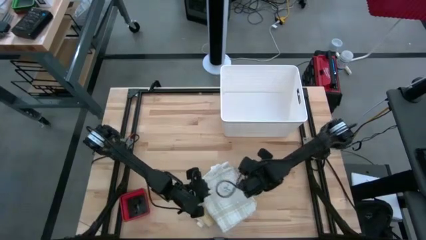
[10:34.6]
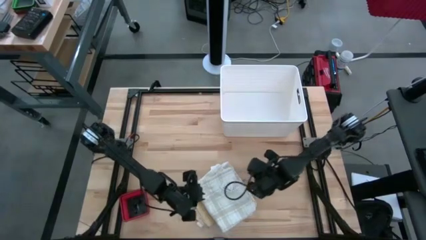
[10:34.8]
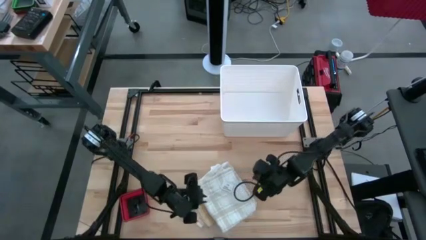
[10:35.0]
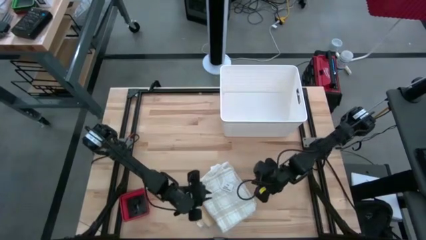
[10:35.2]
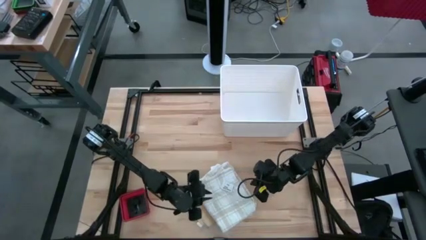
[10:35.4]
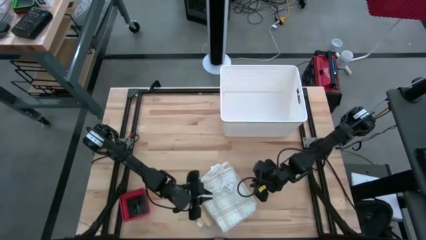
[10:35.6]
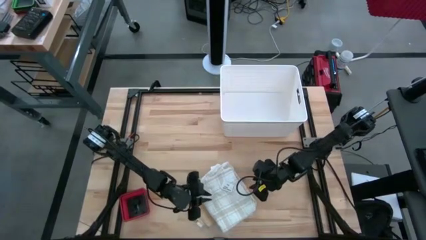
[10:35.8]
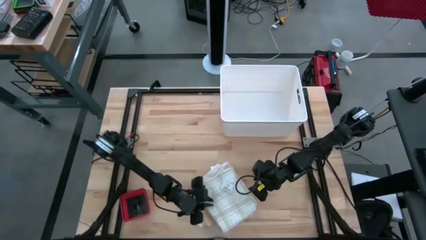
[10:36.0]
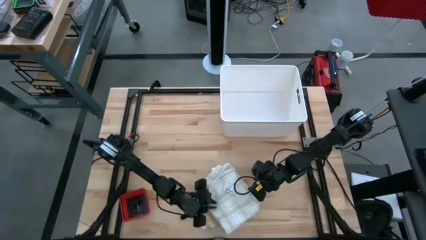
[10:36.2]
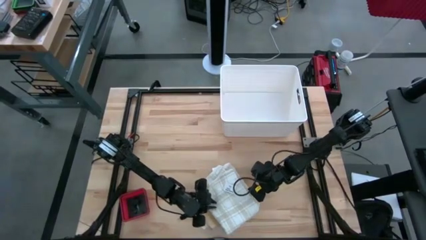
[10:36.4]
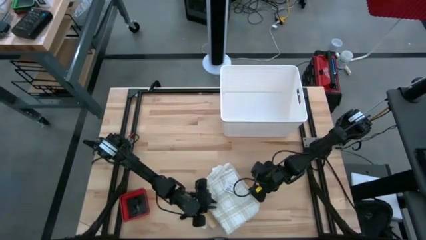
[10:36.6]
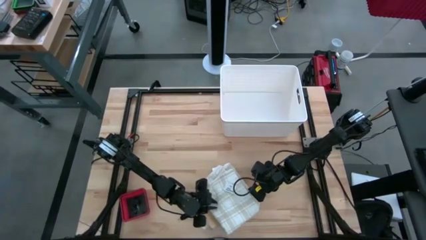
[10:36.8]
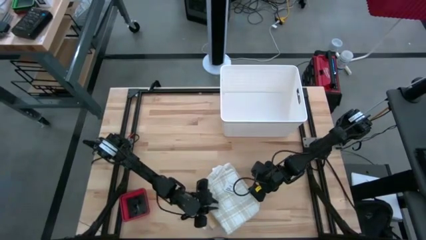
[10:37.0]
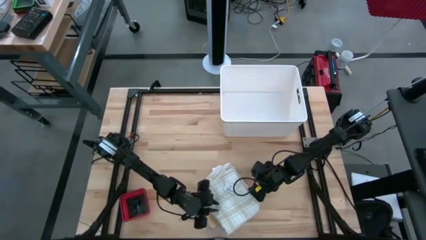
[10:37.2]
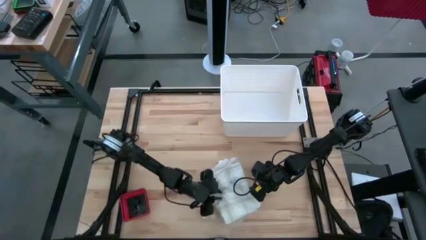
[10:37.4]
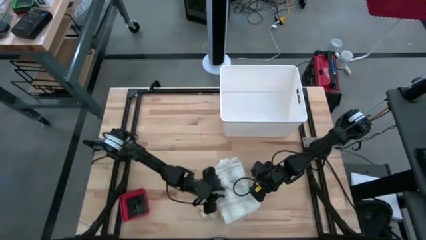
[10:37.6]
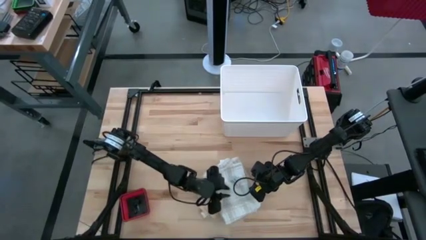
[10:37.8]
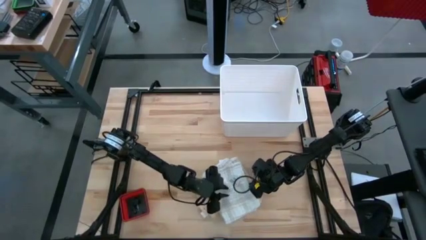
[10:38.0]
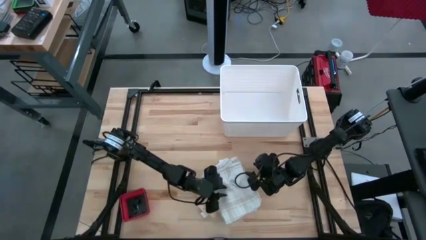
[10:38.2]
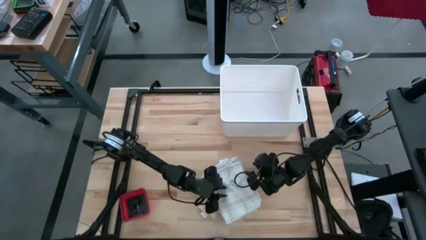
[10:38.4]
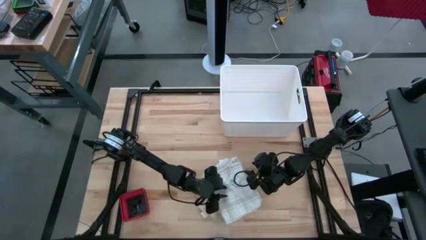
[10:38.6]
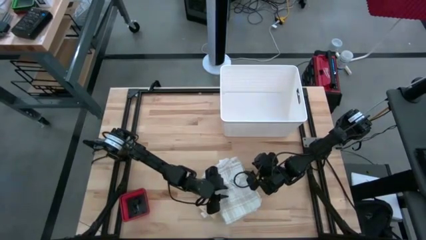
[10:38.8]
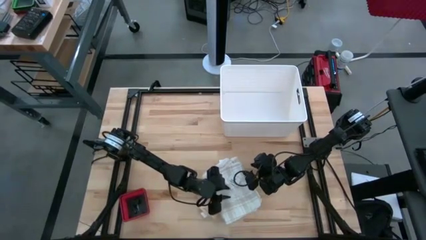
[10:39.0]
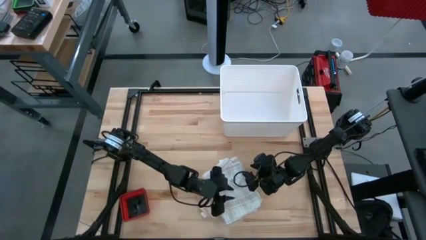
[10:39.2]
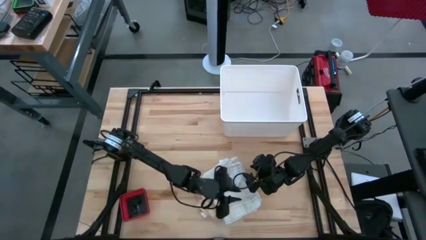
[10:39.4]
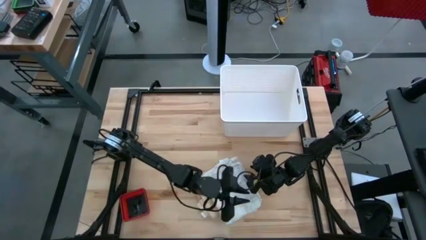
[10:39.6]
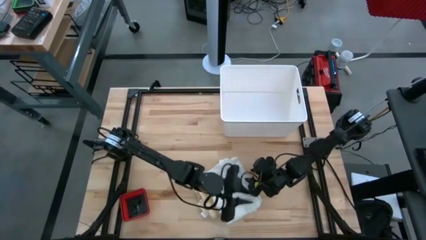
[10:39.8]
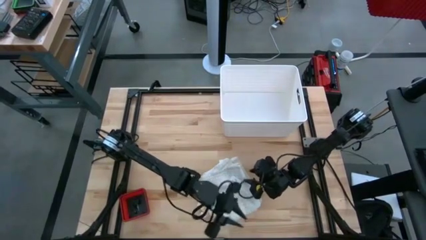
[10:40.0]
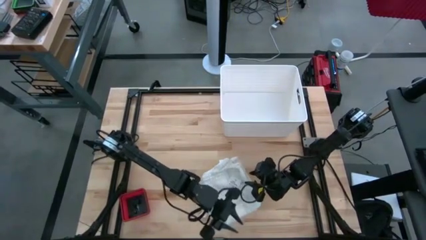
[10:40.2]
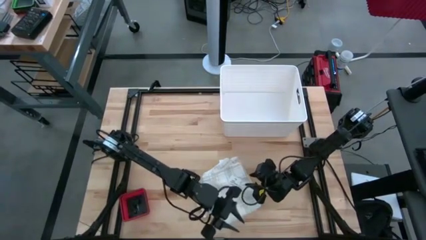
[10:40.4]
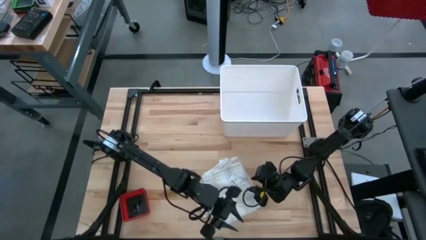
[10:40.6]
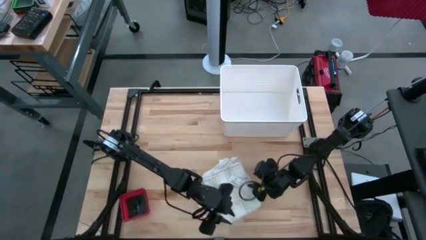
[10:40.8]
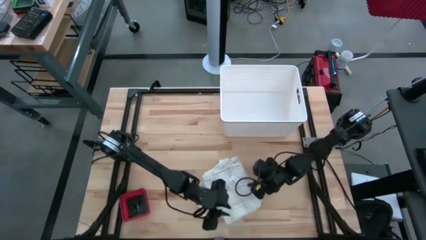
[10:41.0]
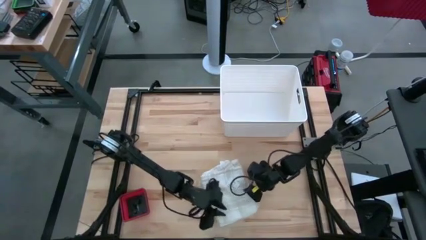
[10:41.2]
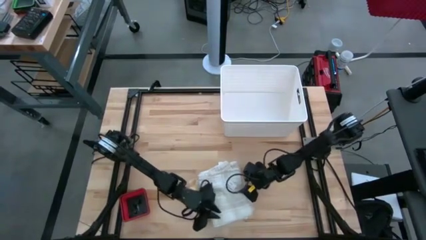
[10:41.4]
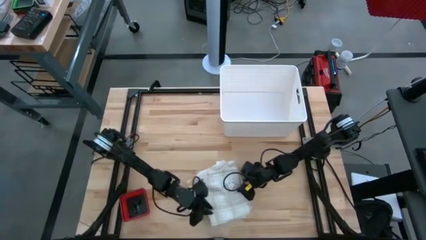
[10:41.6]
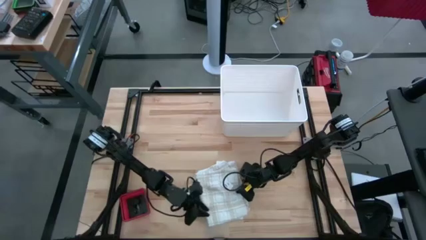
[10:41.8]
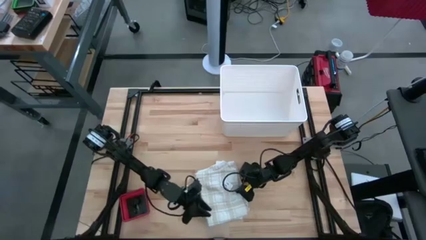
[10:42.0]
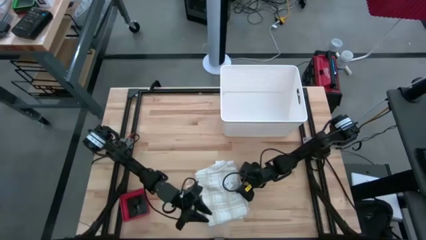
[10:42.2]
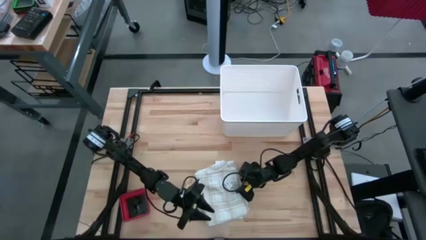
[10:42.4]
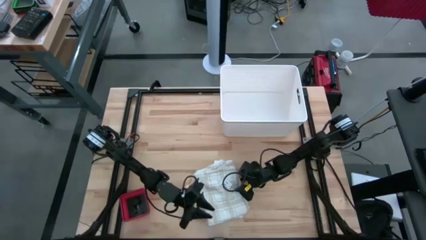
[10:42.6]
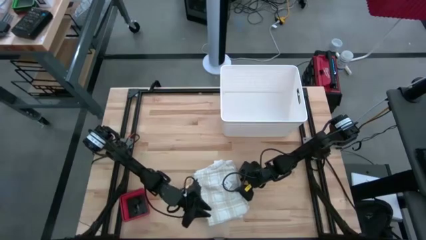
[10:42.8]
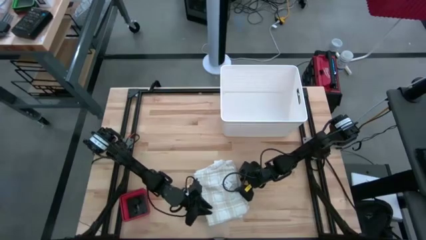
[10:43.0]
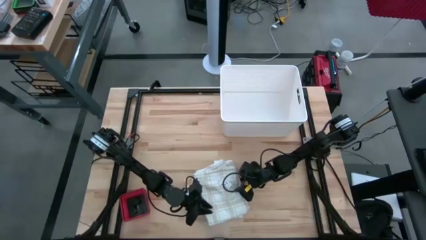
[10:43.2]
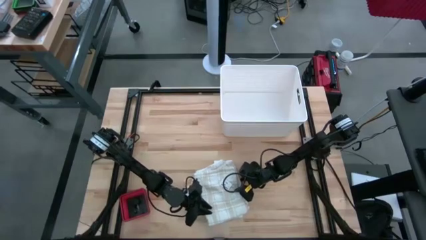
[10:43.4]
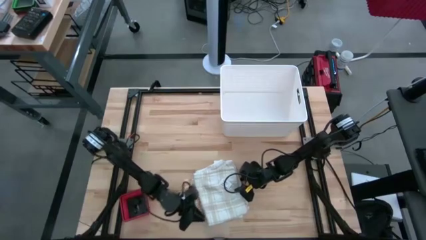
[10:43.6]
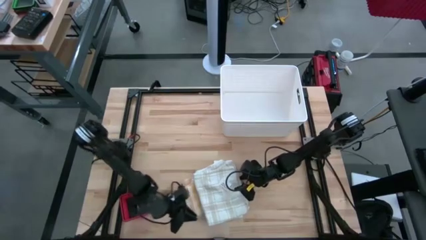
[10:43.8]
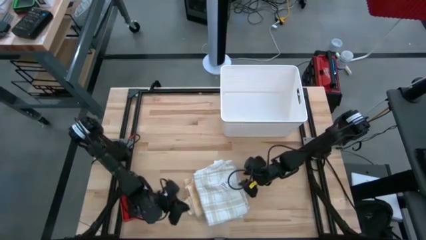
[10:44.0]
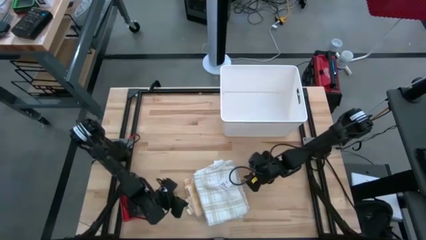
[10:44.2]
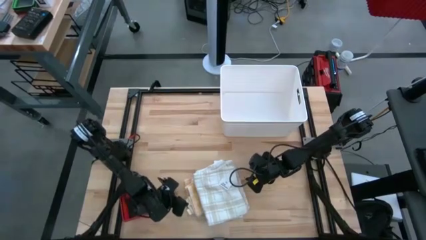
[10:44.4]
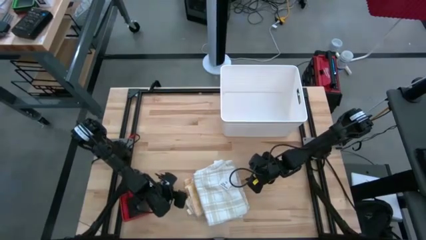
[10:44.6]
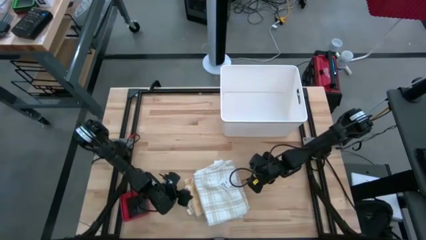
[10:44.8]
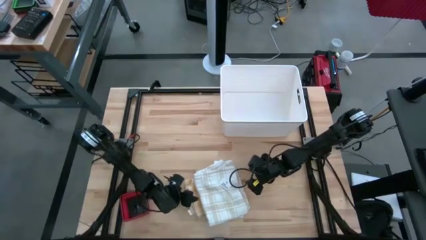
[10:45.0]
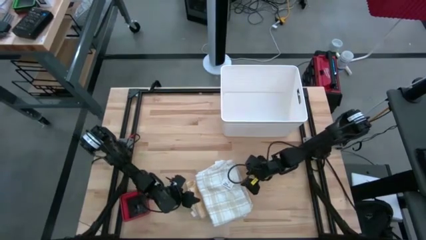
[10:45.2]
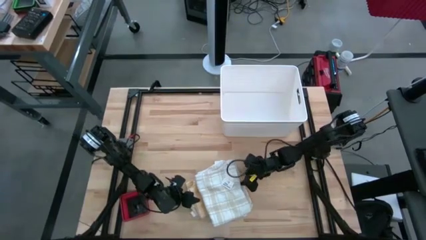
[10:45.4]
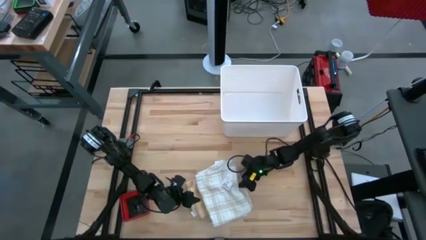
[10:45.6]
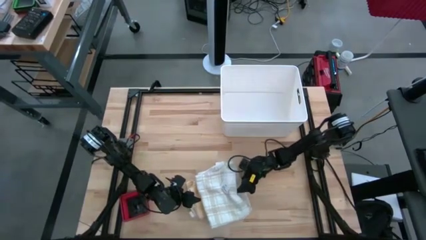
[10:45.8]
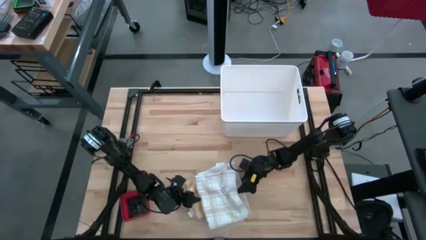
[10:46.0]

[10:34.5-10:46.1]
Task: Fold towel
Put the stack of folded kitchen towels into the white laundry bin

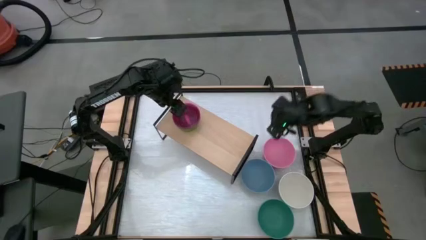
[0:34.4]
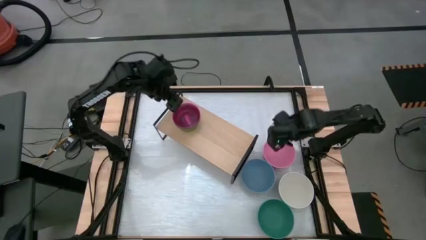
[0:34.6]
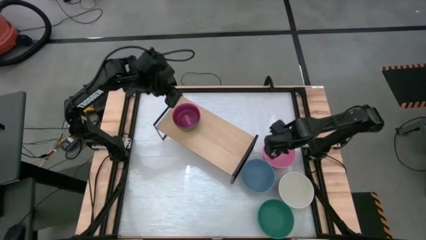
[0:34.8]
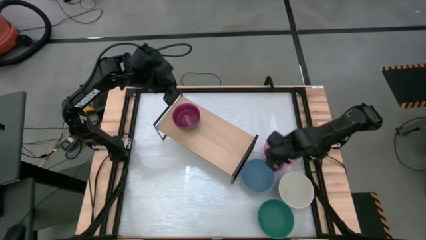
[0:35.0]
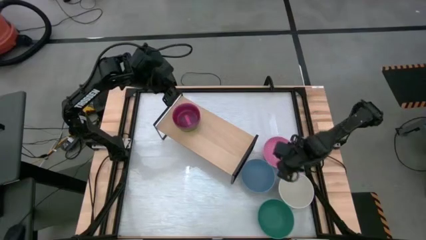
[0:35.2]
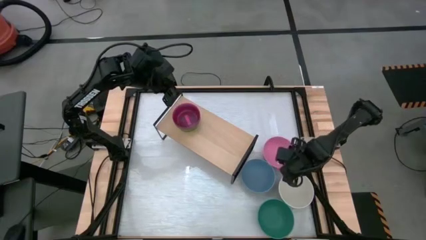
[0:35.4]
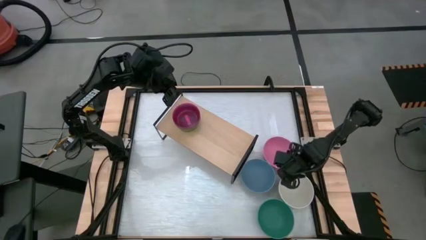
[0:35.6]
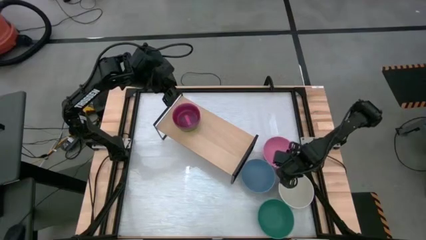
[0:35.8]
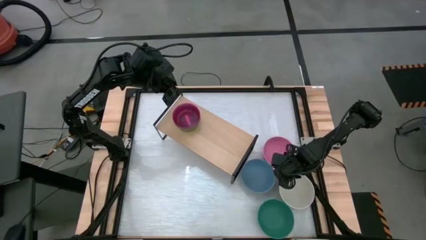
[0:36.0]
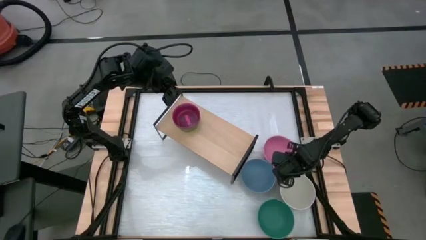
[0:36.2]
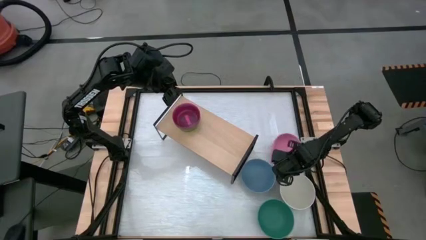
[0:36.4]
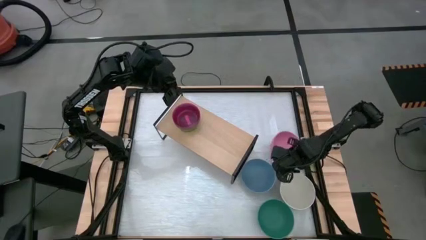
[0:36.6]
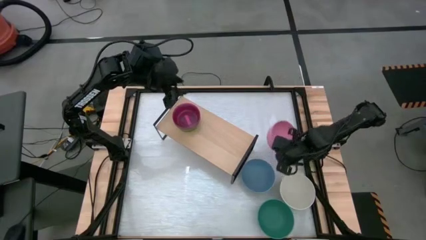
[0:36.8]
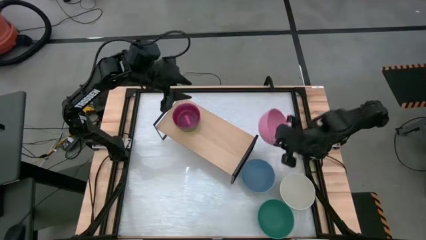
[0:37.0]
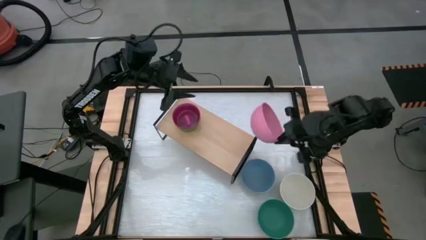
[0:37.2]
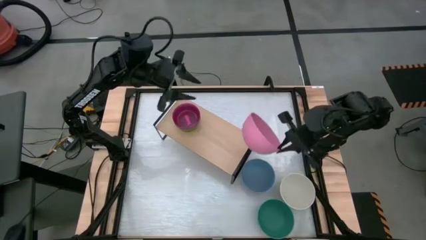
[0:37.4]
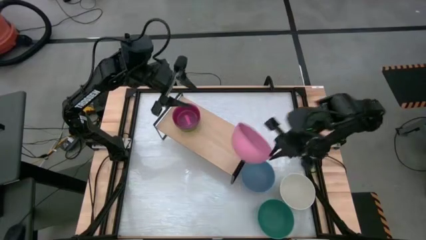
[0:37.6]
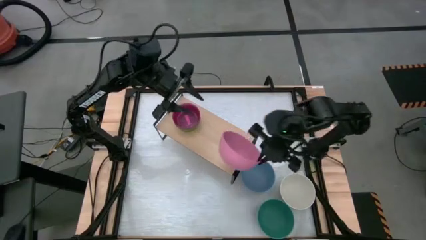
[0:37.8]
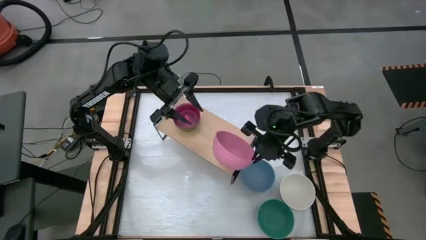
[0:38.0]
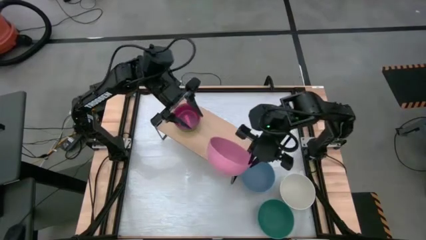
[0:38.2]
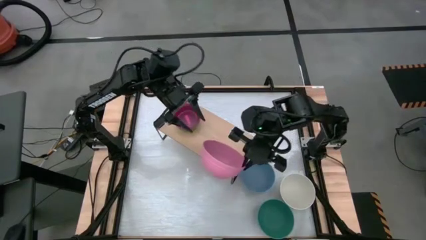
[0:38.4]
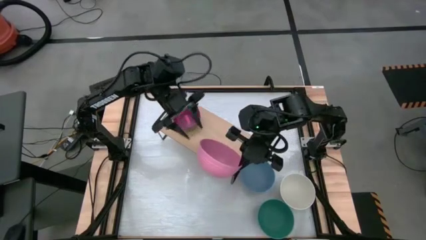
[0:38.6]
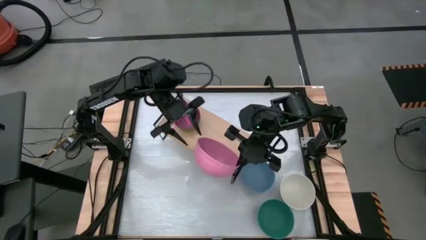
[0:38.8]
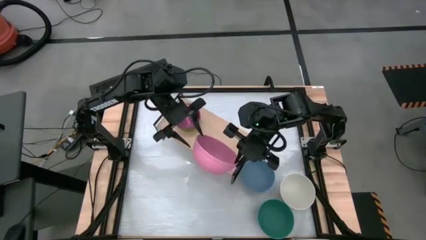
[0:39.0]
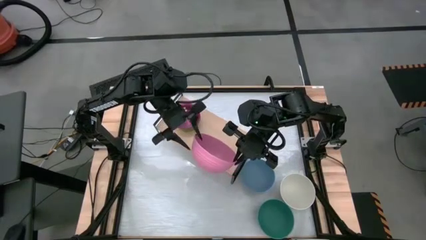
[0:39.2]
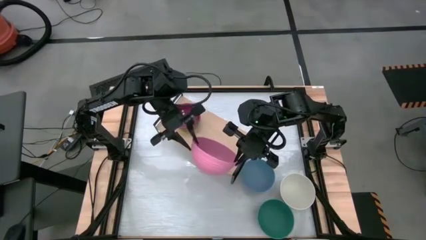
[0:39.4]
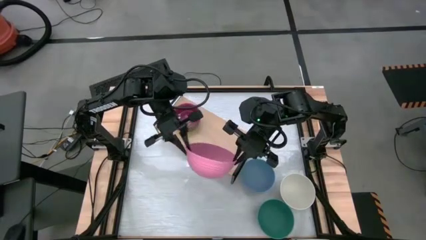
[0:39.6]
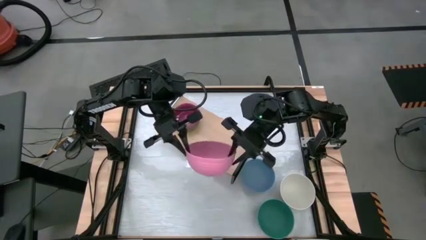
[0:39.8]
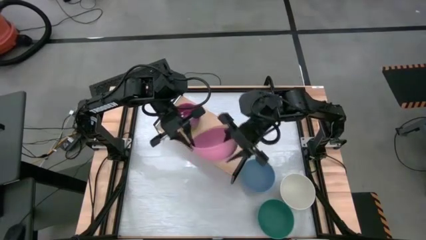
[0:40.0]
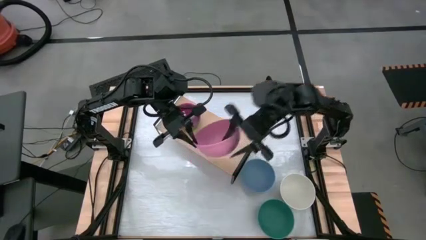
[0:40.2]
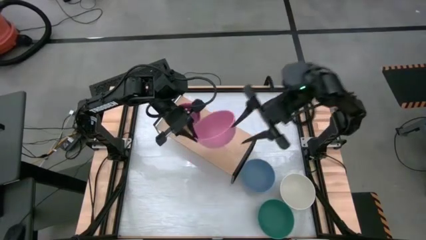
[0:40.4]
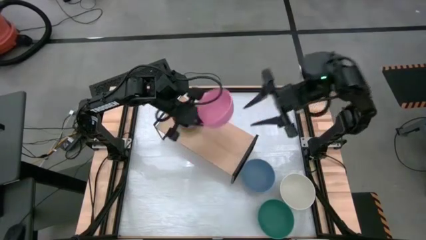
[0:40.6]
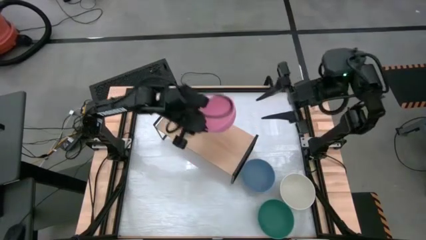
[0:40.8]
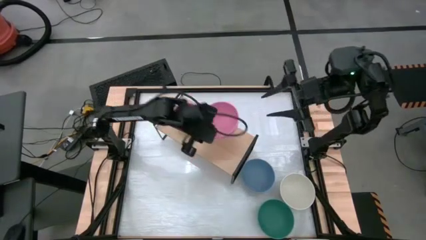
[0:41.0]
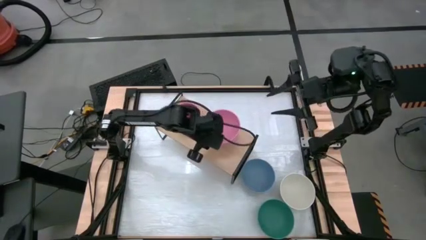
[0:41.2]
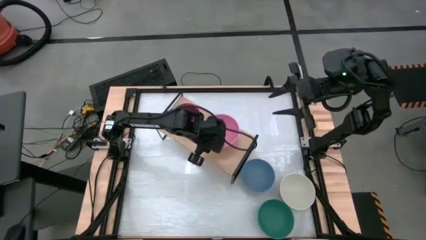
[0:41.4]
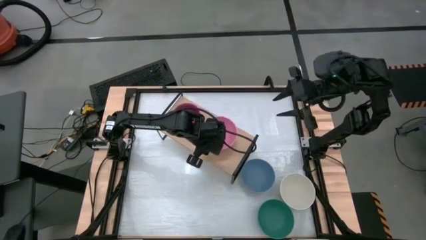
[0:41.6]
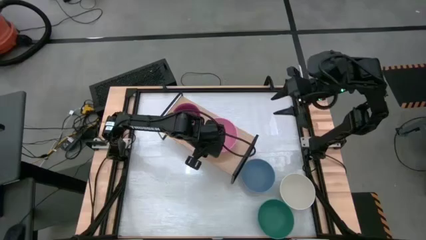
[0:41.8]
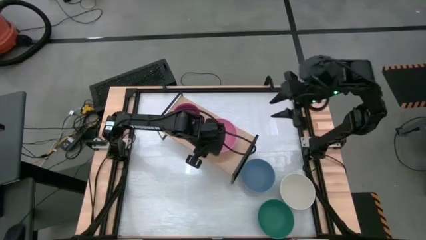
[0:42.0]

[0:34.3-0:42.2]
Task: Place and stack bowls onto a shelf
Put the large pink bowl on the shelf
